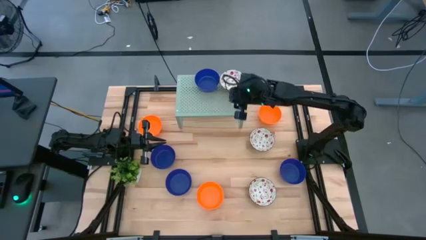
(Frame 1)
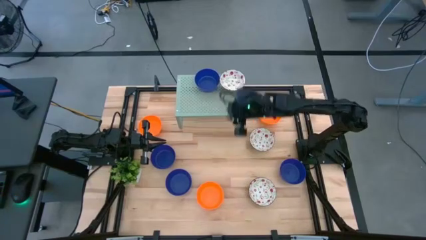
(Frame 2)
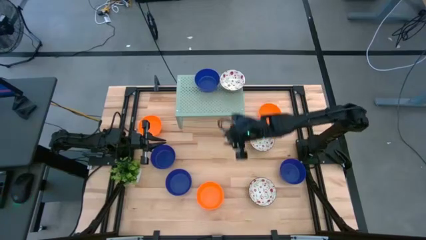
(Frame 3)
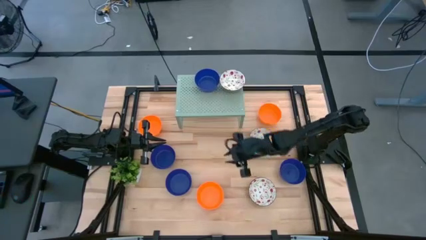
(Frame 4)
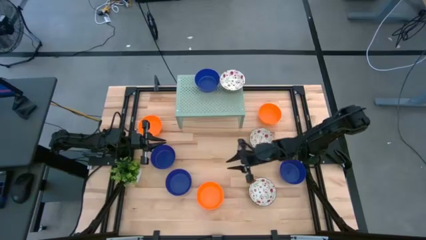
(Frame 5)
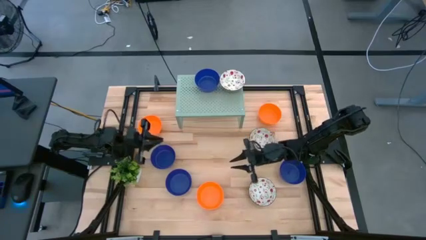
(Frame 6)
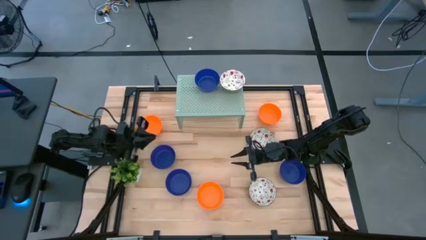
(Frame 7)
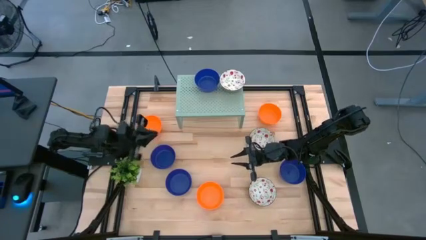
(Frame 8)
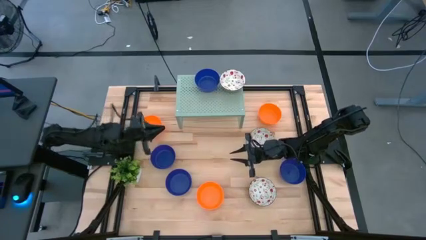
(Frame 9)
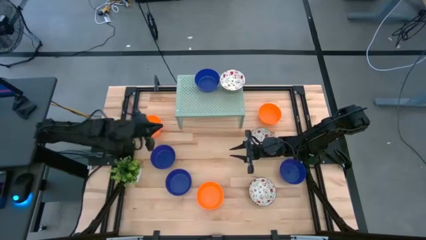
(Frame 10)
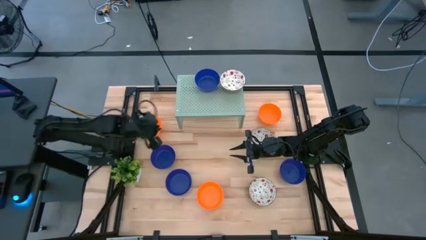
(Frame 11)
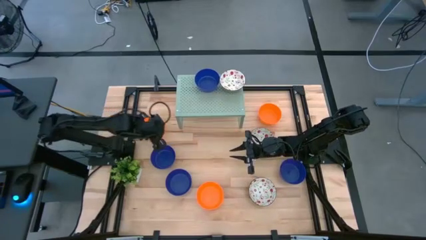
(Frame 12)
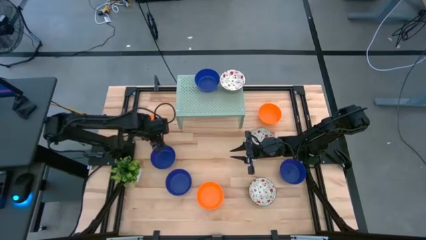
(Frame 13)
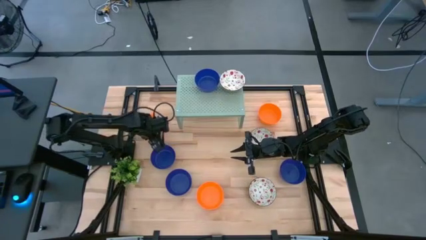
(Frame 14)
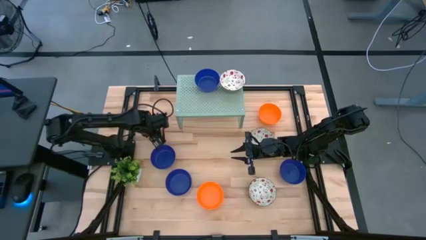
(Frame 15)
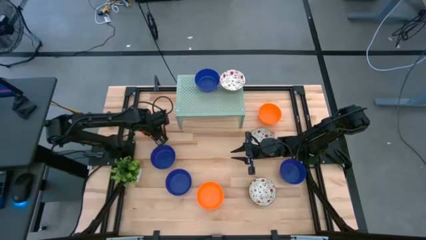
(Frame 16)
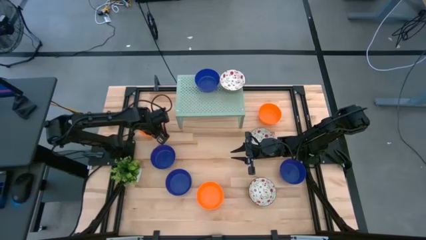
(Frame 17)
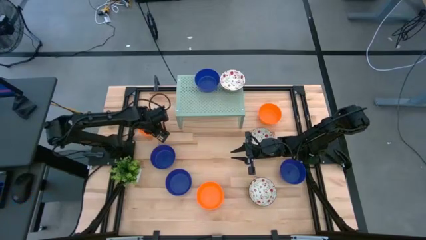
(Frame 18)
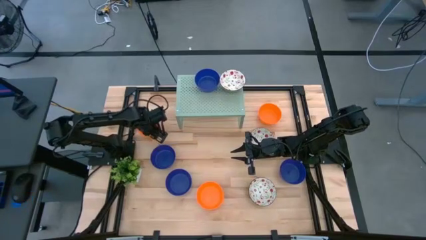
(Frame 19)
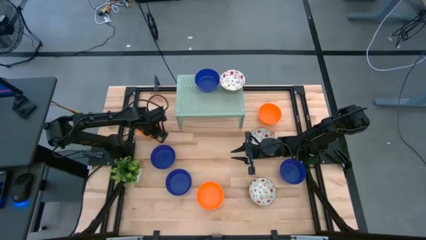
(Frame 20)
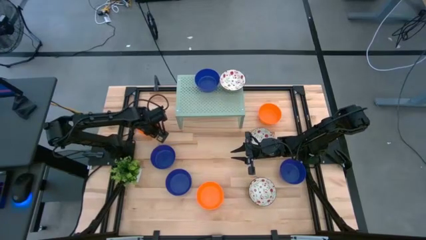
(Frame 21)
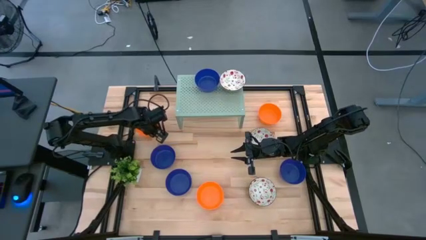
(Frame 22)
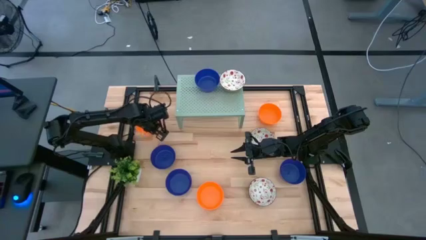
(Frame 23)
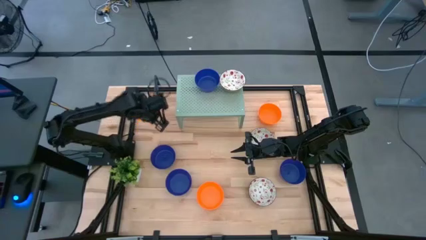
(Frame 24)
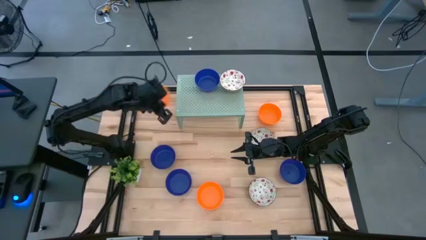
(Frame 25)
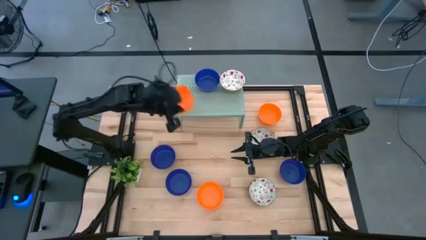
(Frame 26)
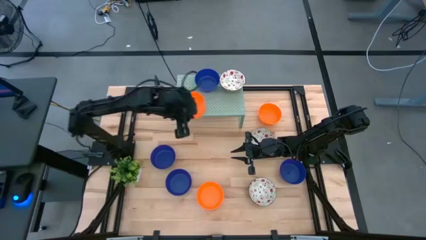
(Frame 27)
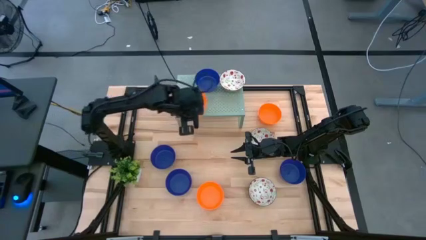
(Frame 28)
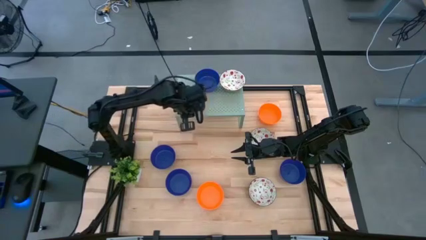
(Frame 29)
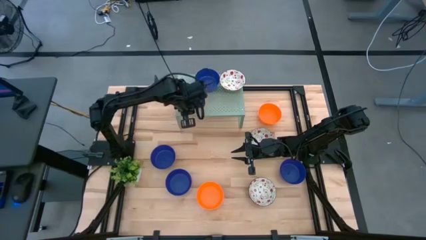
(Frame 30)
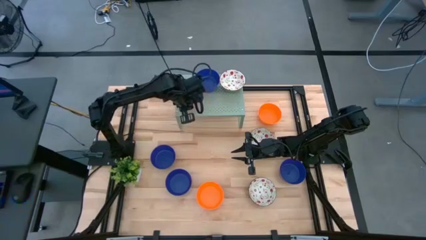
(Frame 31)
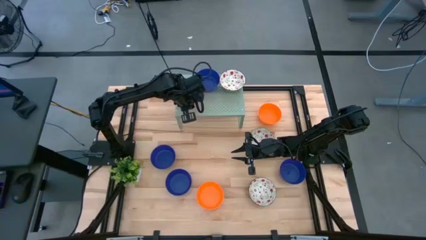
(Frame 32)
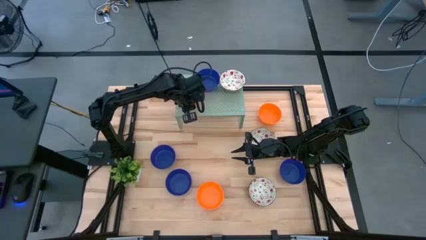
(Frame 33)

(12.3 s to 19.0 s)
Task: Pick & Place Mini bowls
Put the orange bowl on the shelf

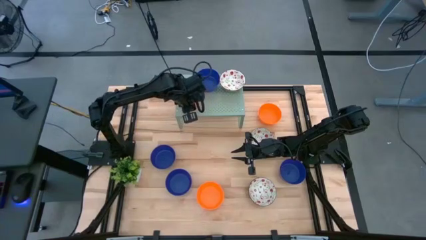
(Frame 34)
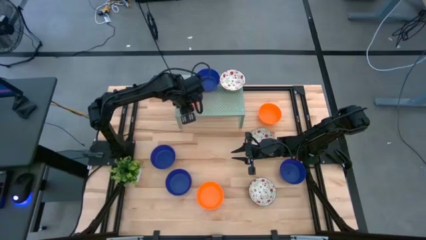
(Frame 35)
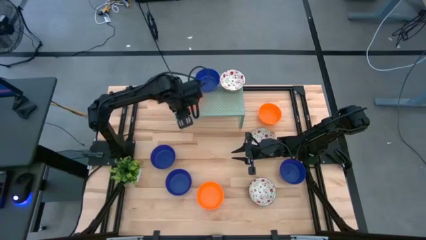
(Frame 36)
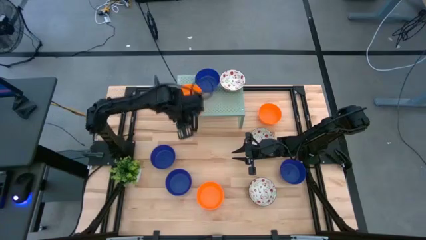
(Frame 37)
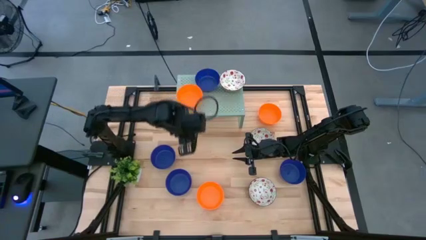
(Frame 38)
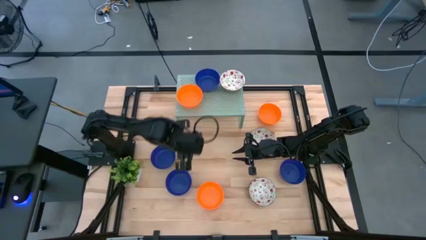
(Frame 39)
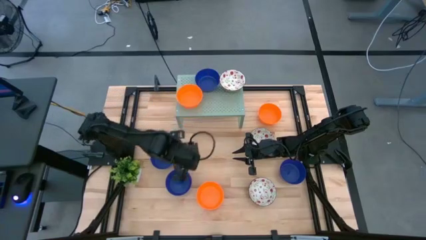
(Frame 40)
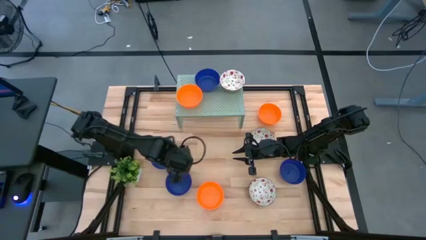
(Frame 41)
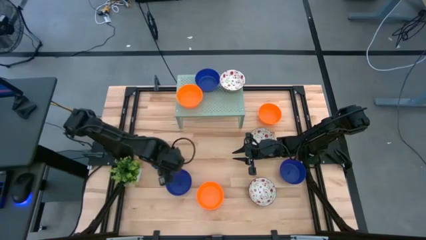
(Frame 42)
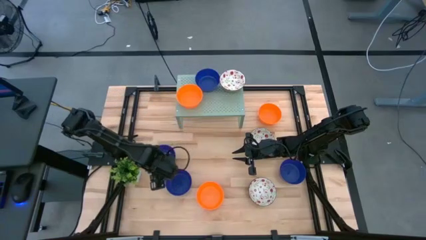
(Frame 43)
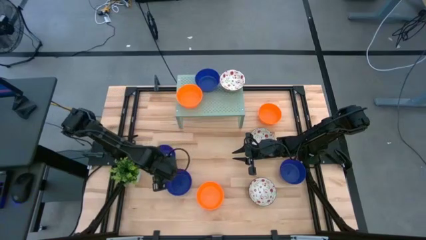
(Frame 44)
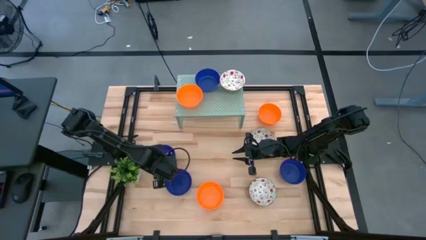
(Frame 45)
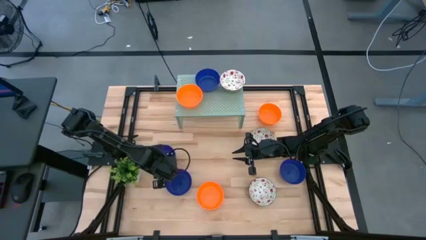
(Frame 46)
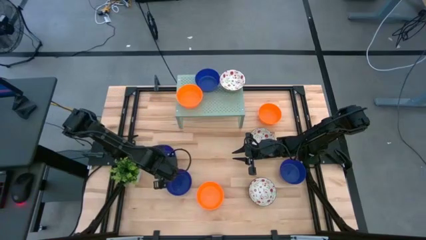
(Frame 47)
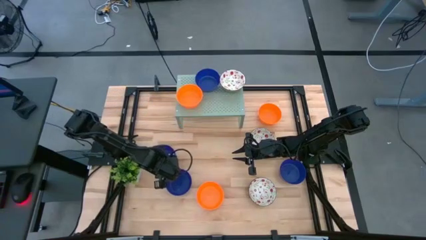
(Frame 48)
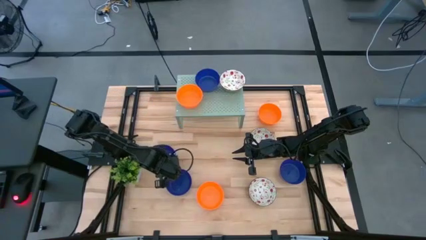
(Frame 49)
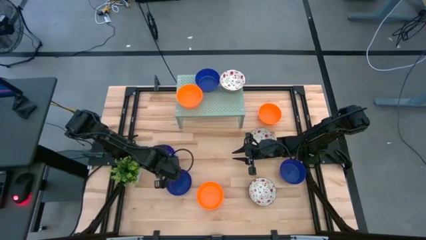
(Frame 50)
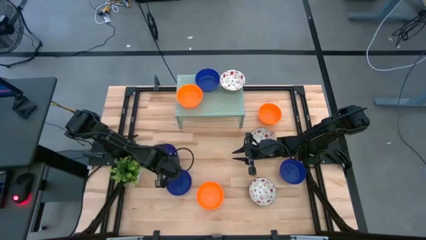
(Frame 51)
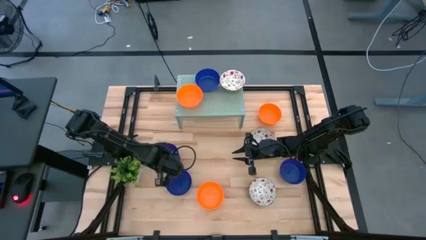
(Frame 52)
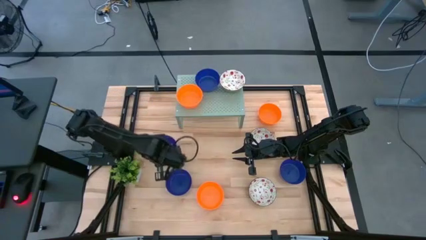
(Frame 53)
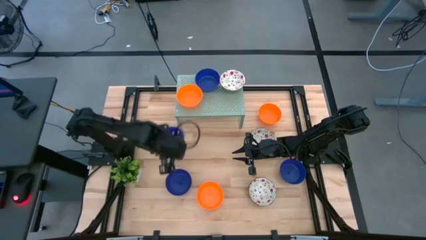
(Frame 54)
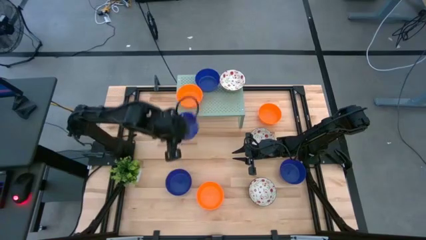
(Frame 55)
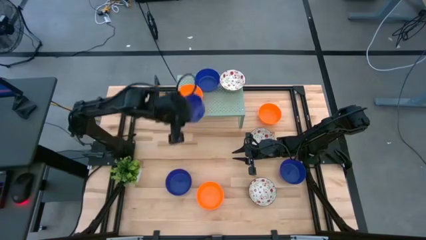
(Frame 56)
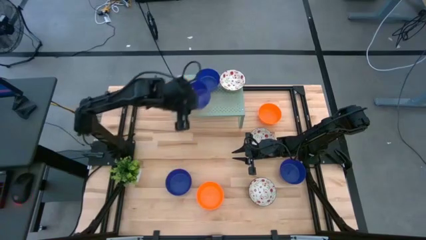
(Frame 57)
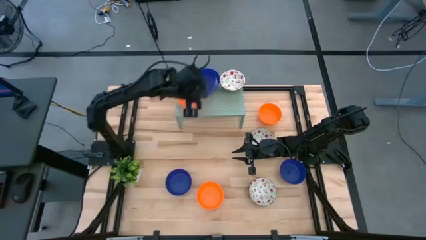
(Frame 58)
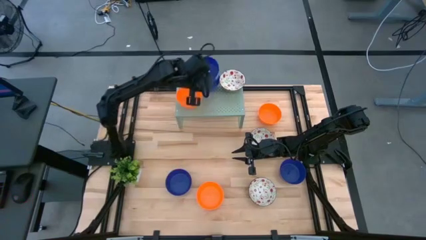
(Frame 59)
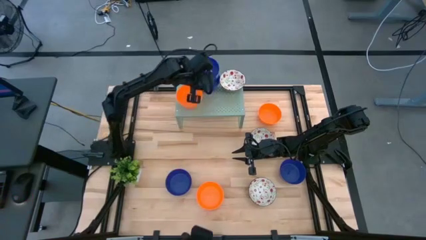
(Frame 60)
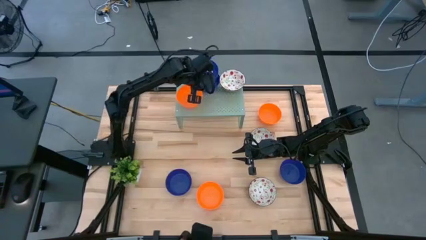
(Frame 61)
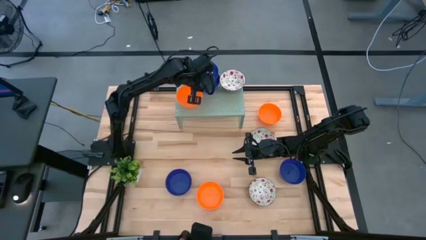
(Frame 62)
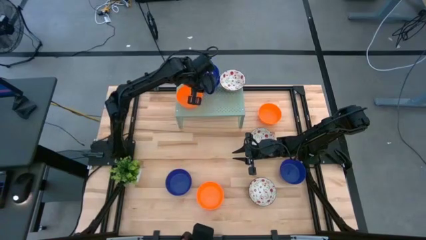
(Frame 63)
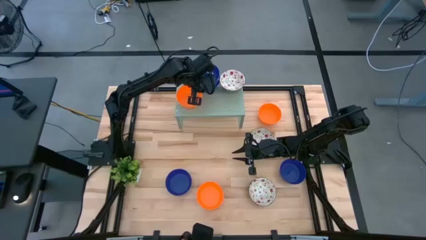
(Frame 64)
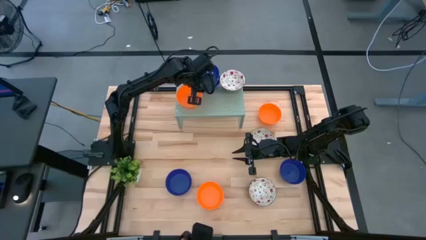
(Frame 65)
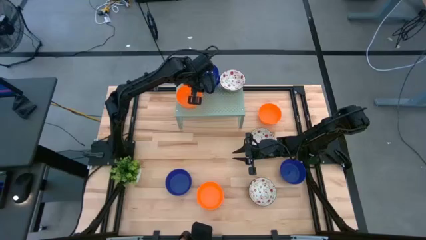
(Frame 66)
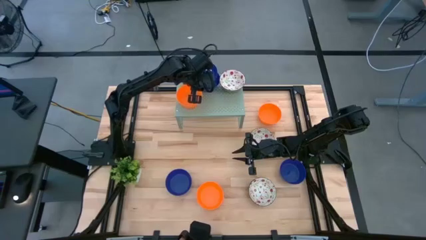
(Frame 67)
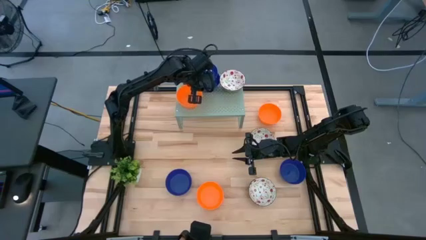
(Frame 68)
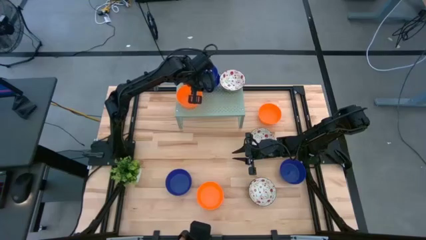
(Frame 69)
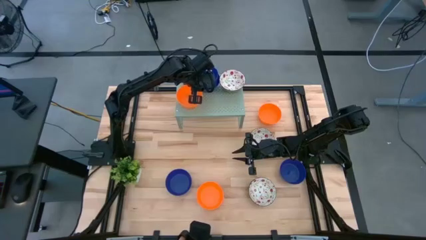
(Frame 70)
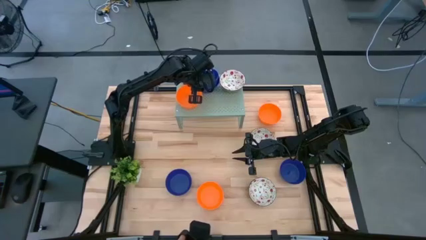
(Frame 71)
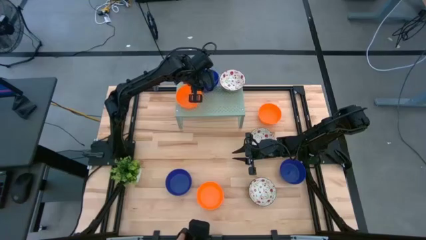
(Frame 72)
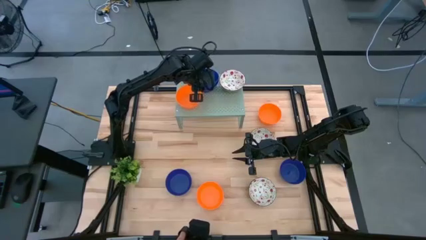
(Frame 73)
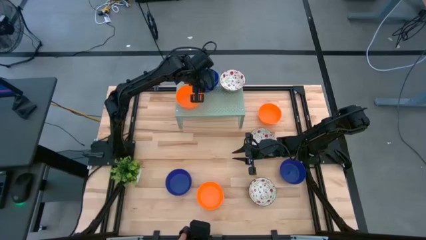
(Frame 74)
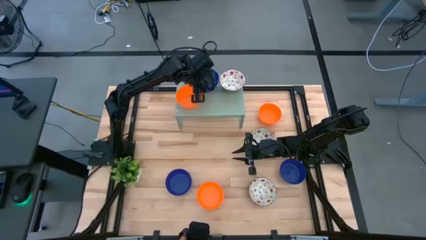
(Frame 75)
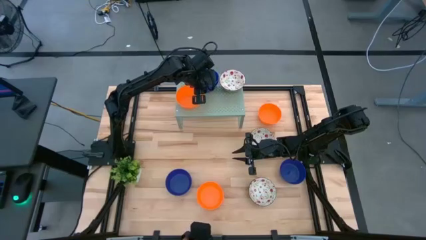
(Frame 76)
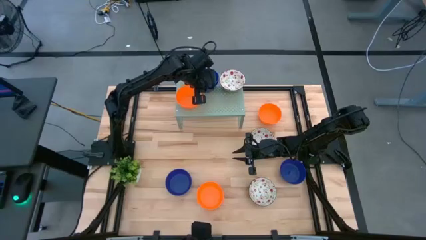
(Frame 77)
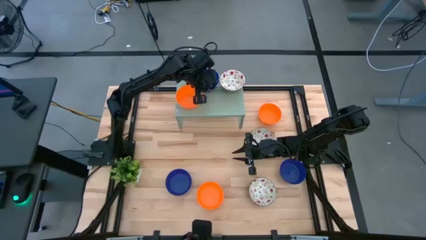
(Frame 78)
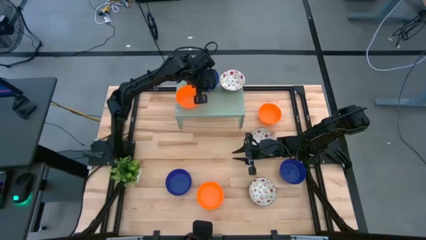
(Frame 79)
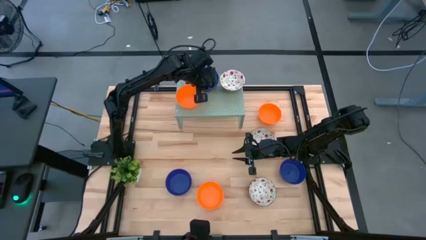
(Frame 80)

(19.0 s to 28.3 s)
Stack the blue bowl on the blue bowl on the shelf
